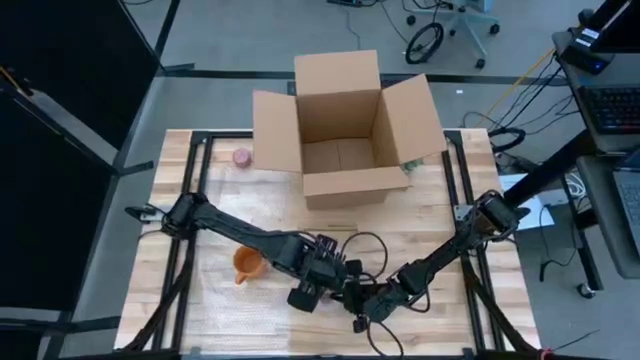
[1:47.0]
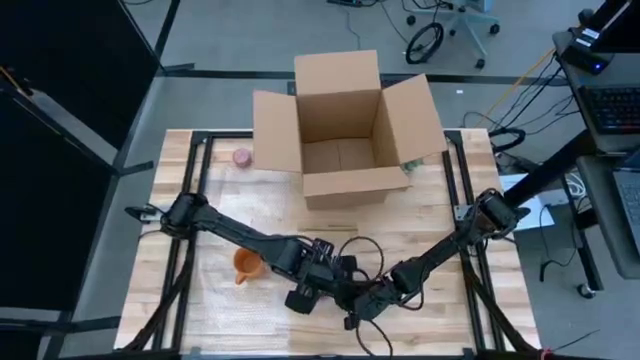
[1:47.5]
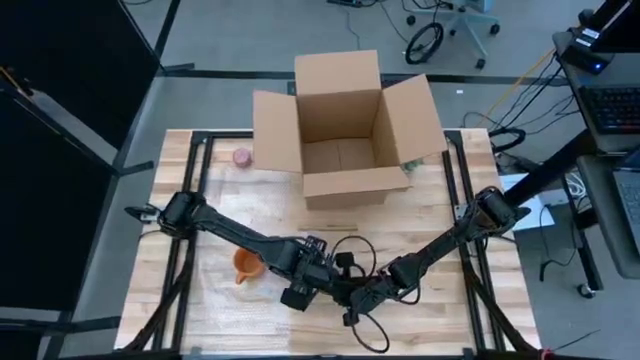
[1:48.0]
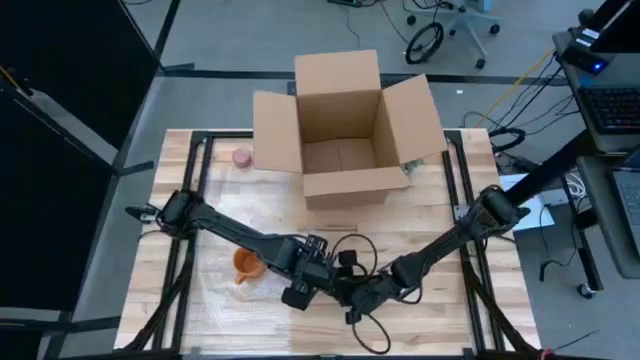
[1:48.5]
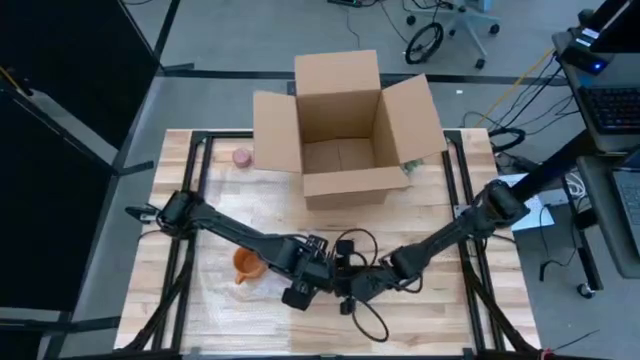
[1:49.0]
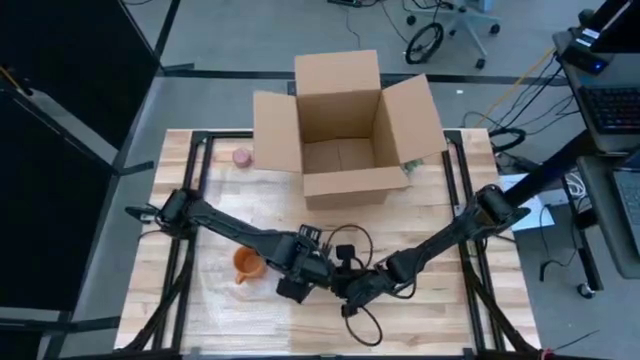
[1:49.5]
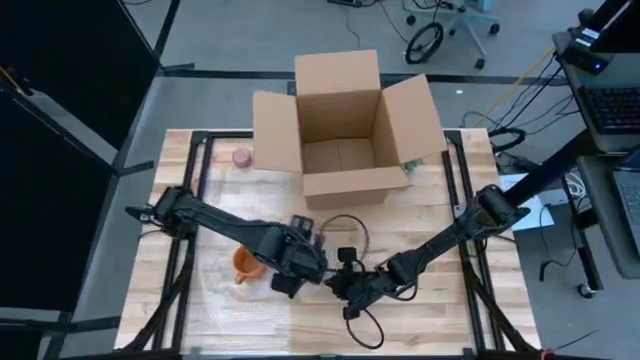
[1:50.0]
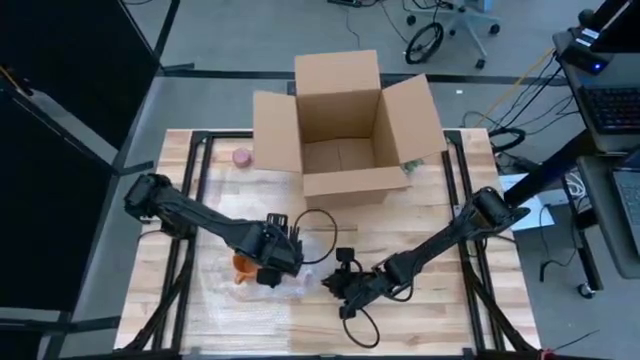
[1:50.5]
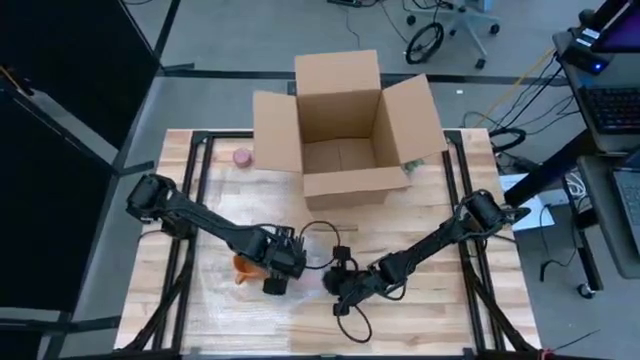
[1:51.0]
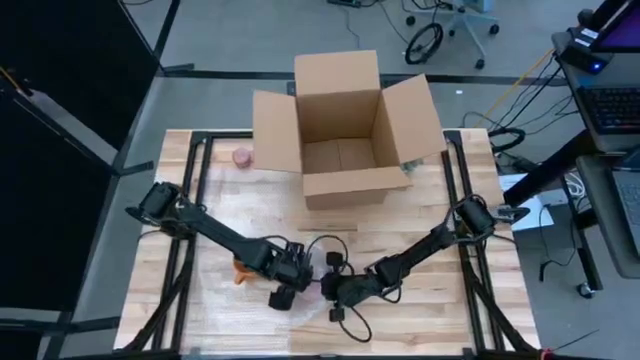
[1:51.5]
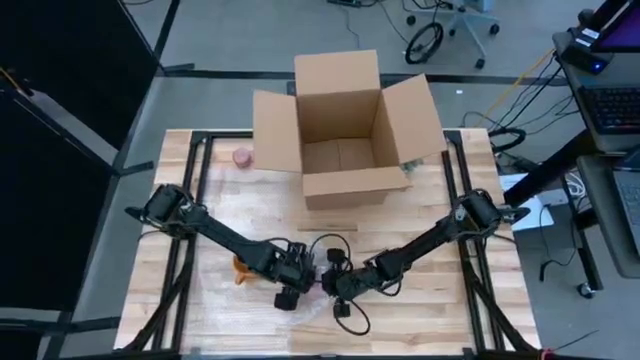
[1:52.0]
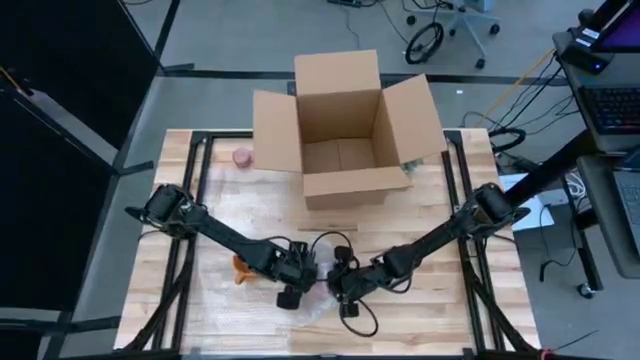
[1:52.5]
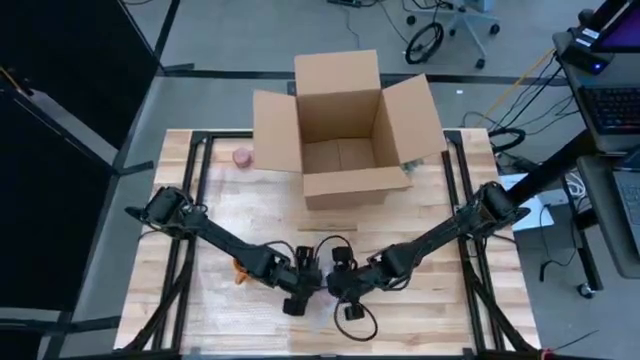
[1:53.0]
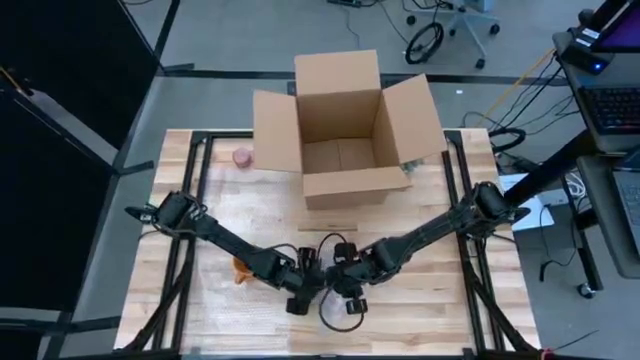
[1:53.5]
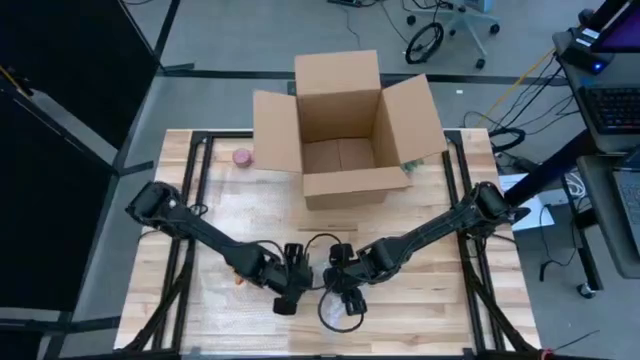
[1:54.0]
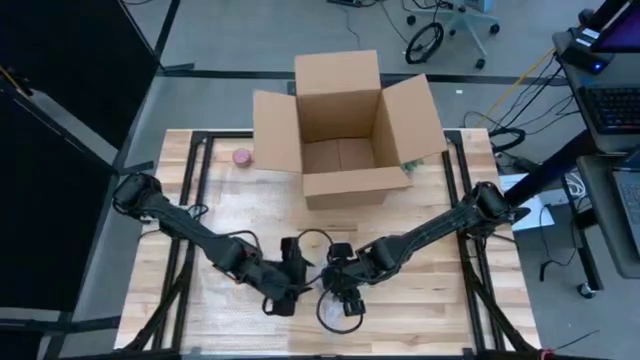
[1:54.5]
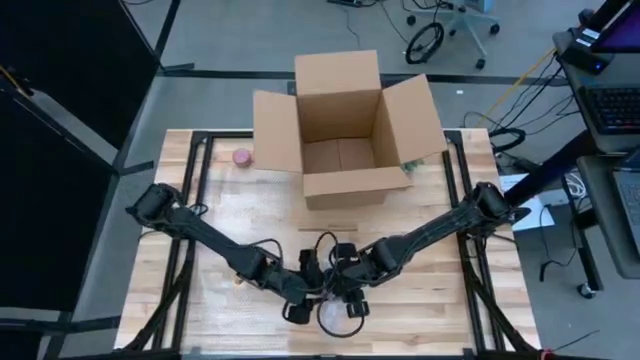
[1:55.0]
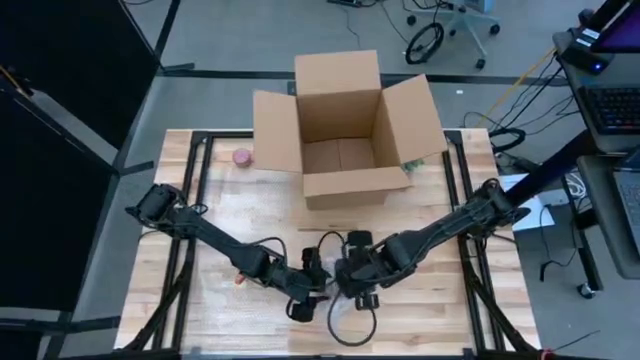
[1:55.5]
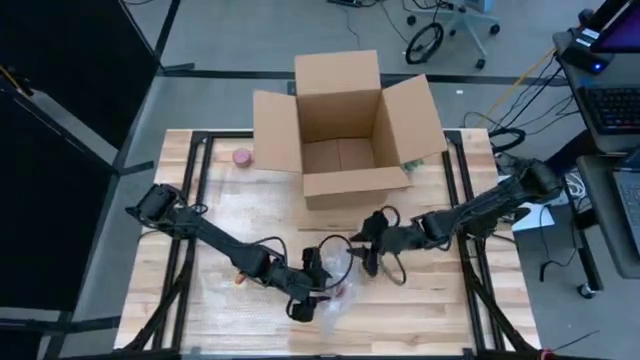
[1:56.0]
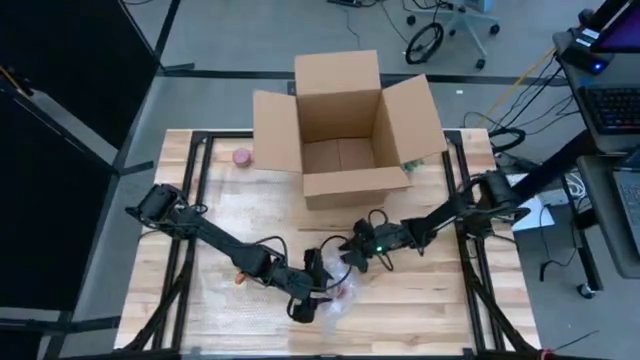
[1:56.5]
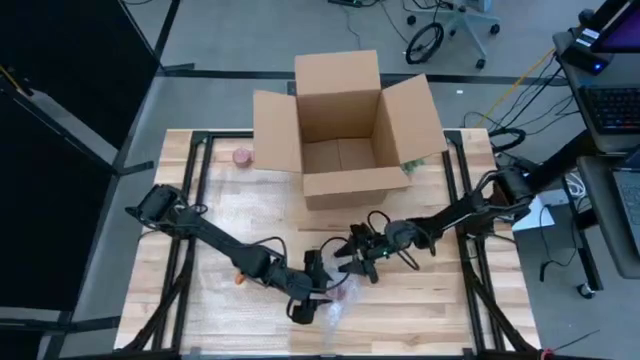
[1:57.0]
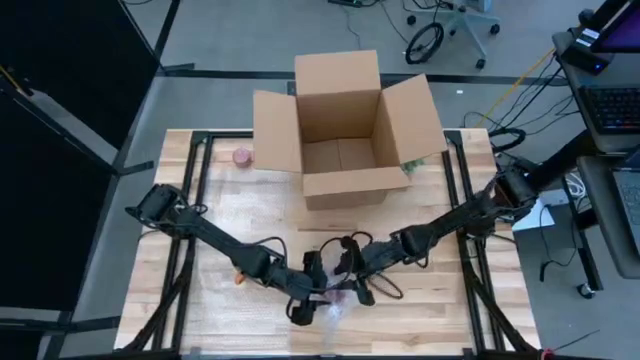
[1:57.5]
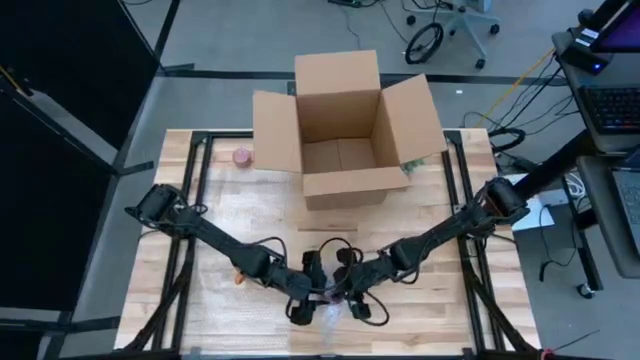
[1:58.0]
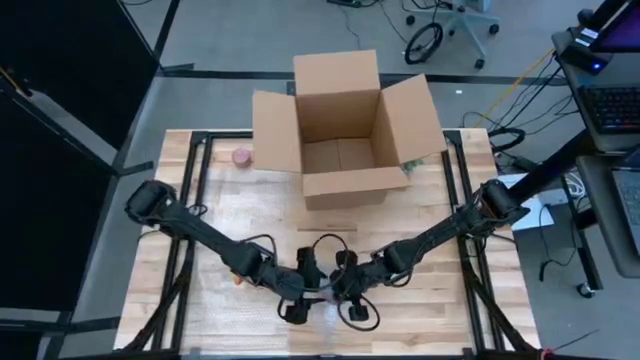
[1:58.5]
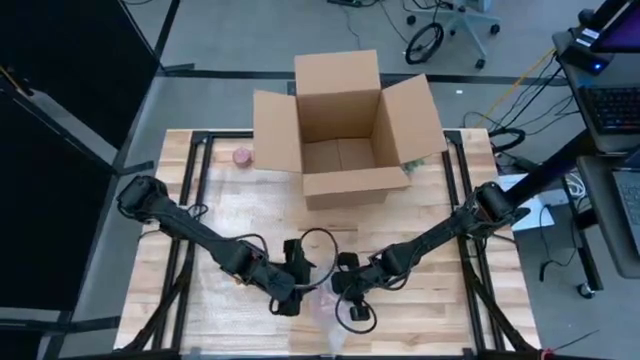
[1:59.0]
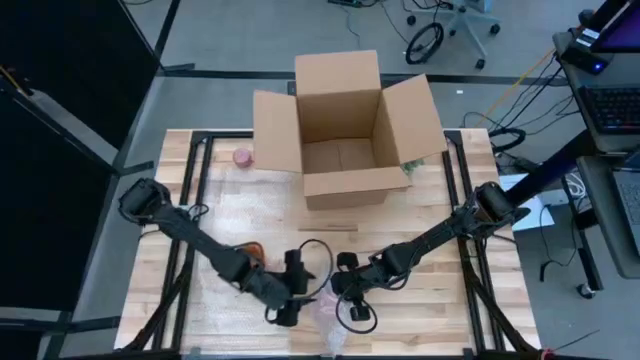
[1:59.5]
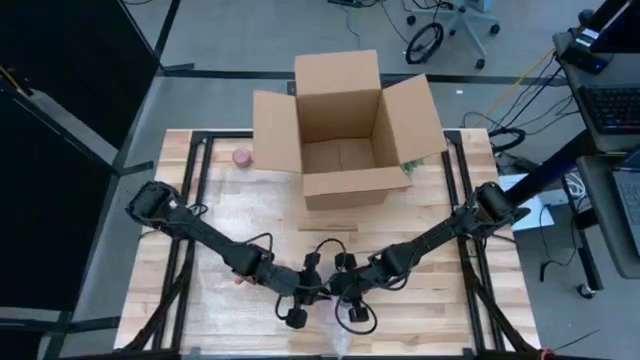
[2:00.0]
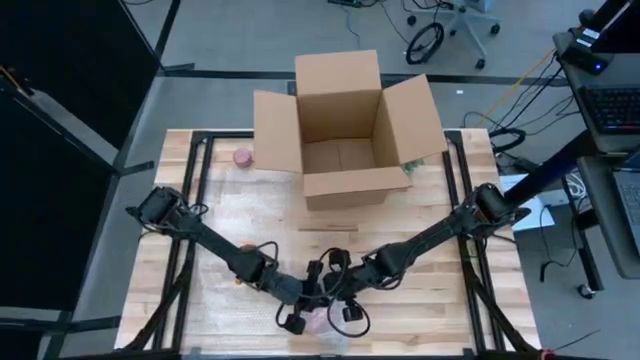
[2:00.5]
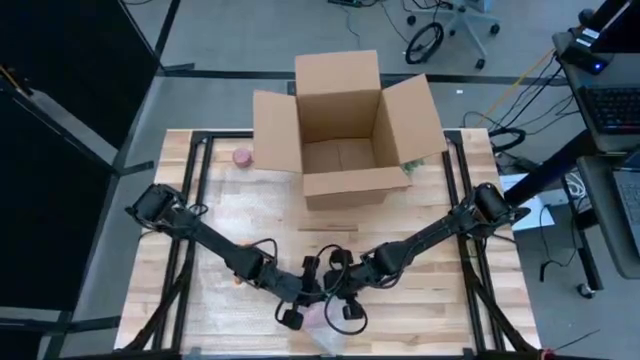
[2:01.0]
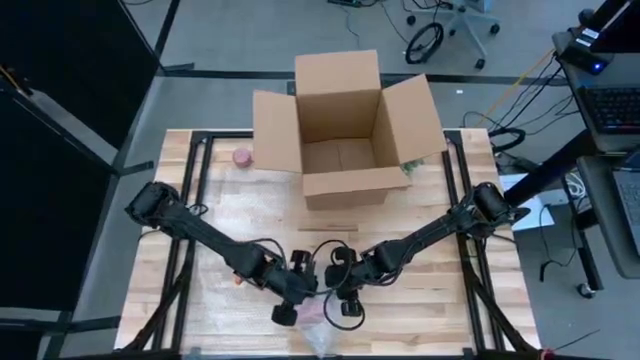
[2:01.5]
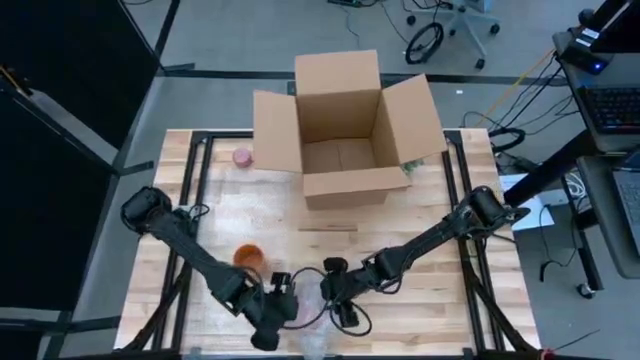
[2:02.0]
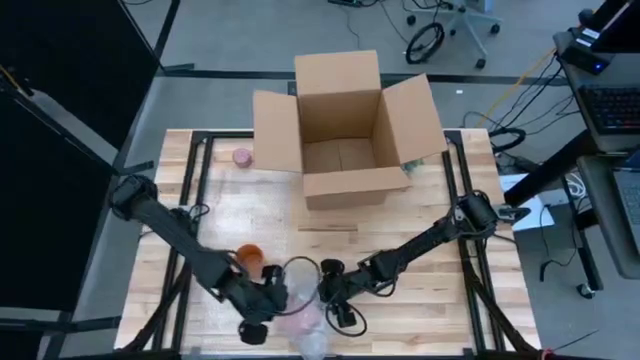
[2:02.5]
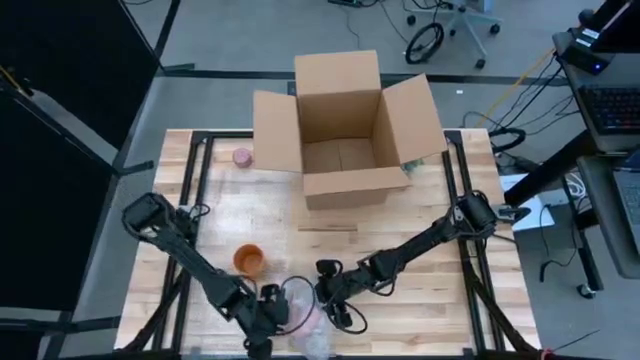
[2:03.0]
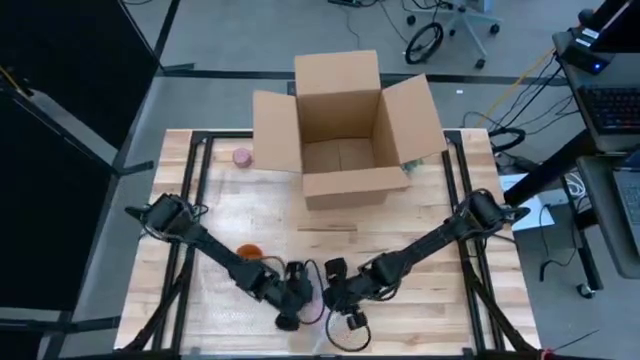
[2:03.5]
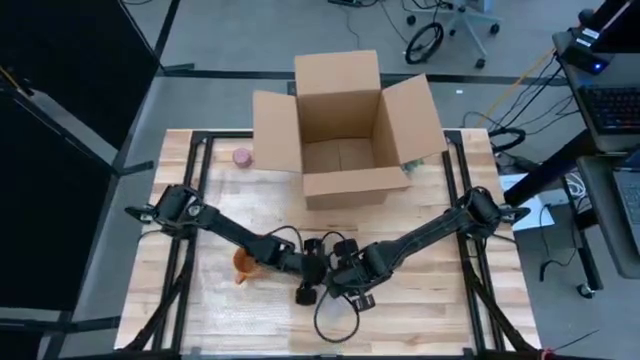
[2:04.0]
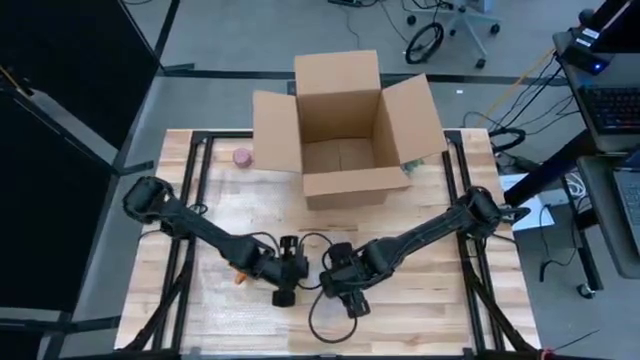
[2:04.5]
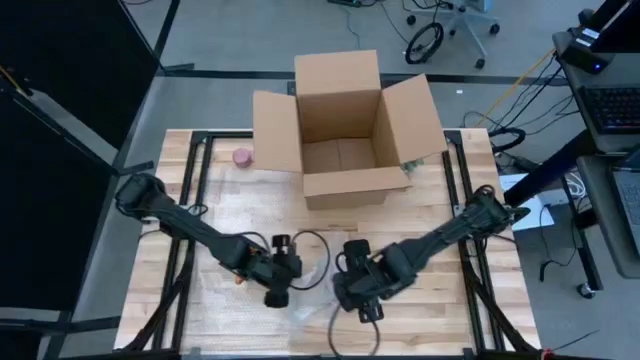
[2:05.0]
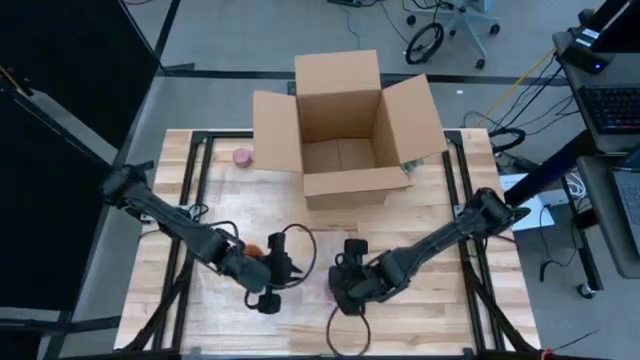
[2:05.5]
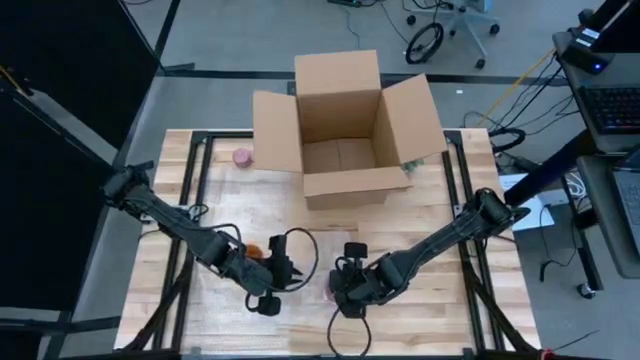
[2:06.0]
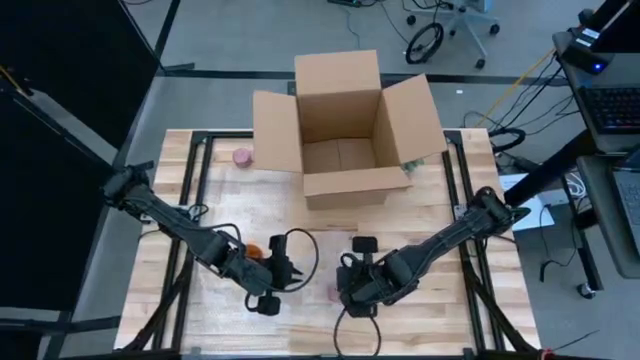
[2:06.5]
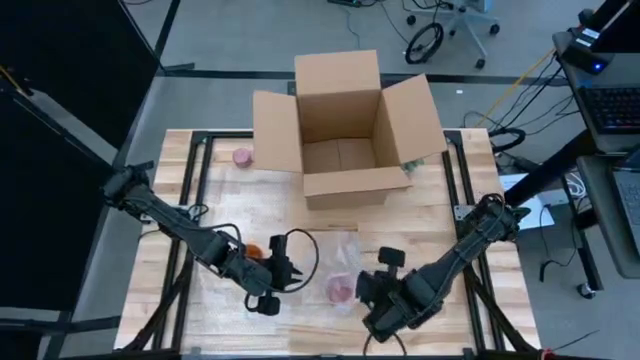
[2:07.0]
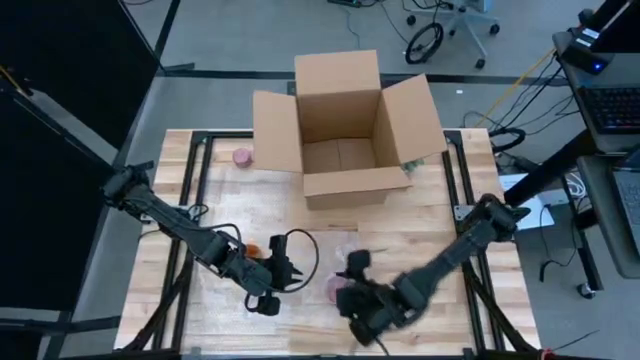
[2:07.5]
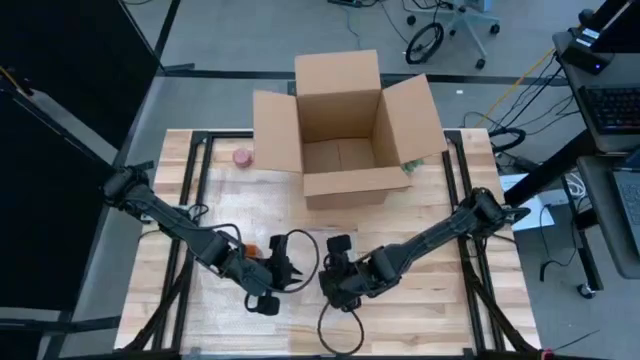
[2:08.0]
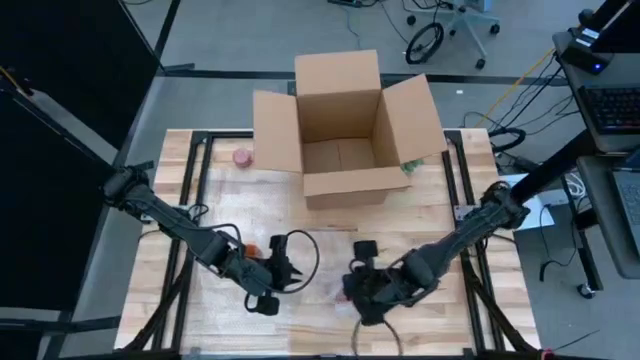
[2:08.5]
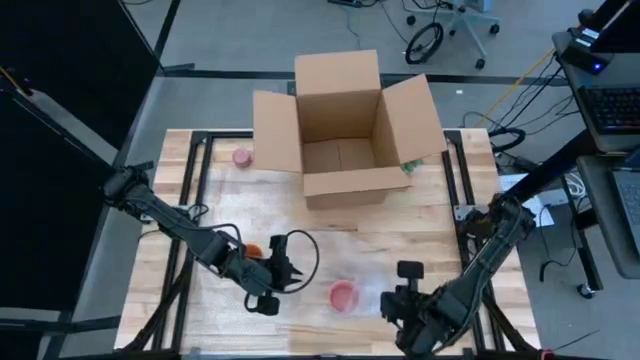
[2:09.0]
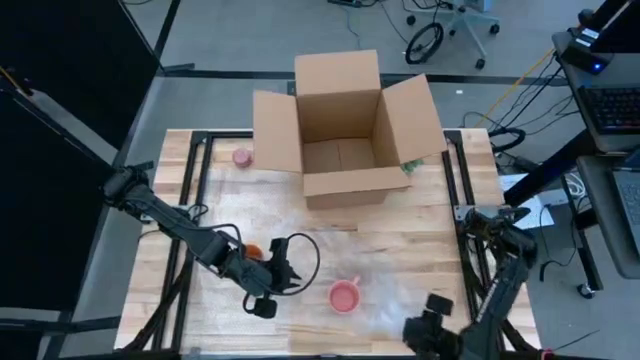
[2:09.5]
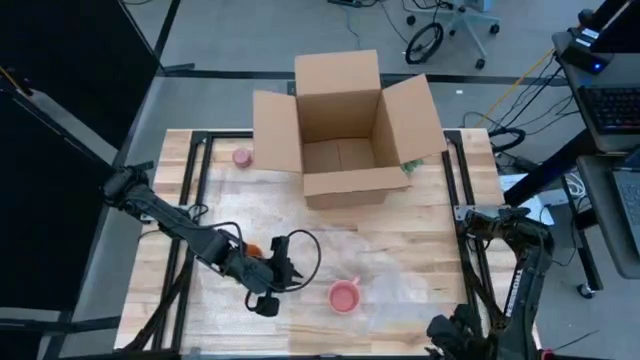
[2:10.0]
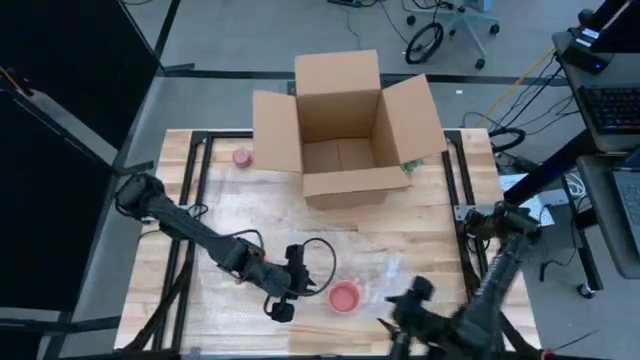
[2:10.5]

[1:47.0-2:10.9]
Task: wrap mug
Wrap the pink cup with the bubble wrap
